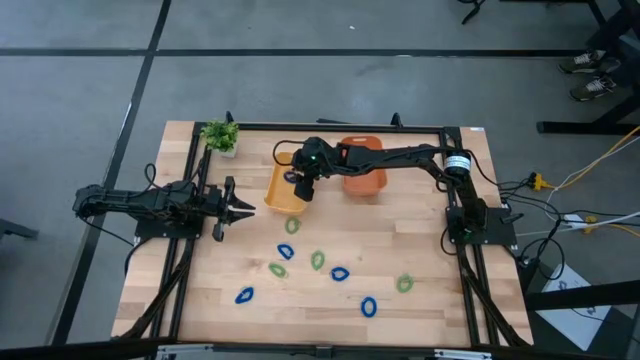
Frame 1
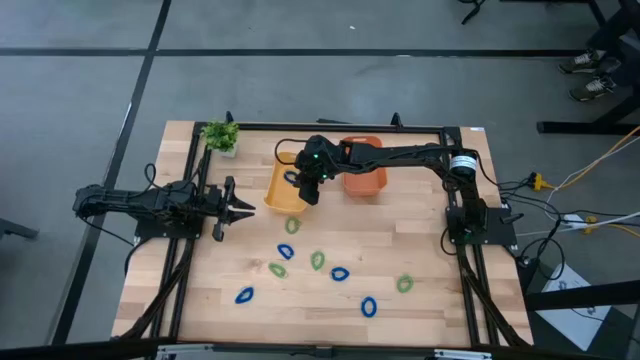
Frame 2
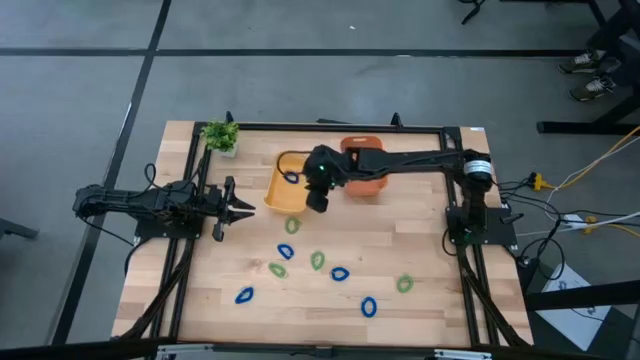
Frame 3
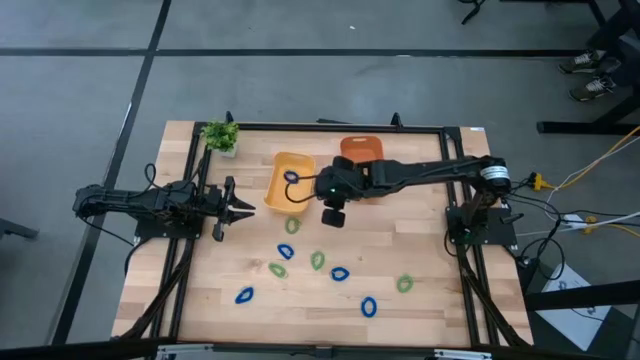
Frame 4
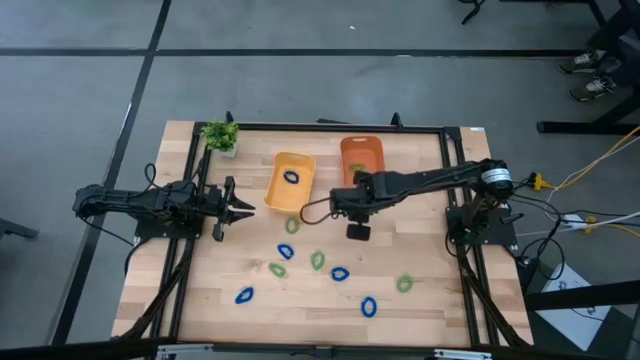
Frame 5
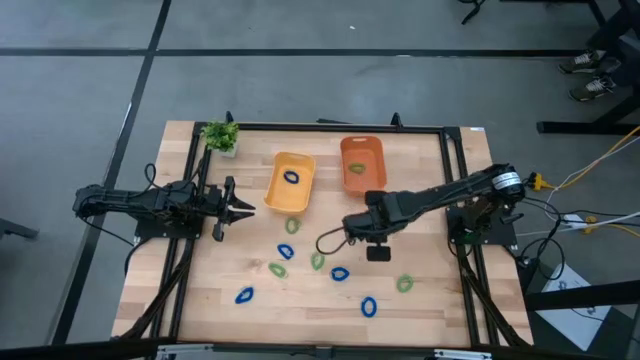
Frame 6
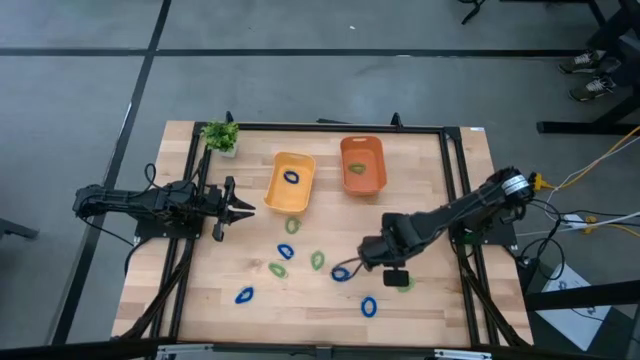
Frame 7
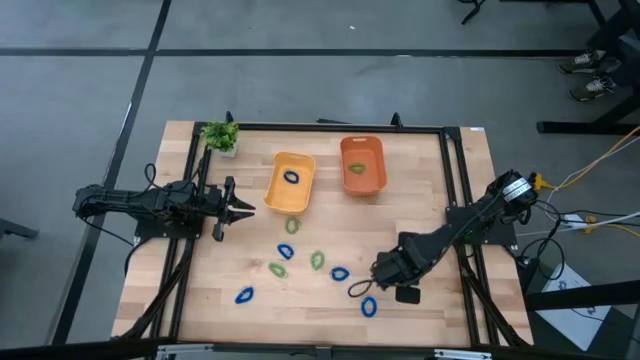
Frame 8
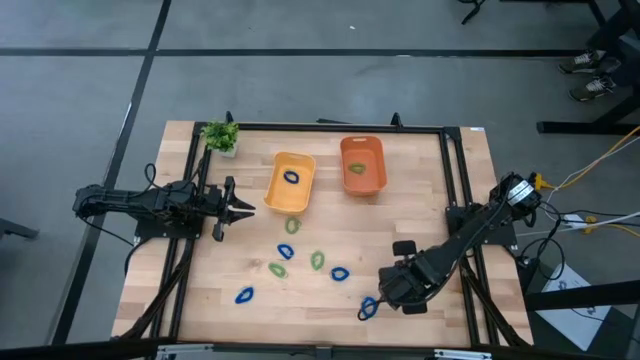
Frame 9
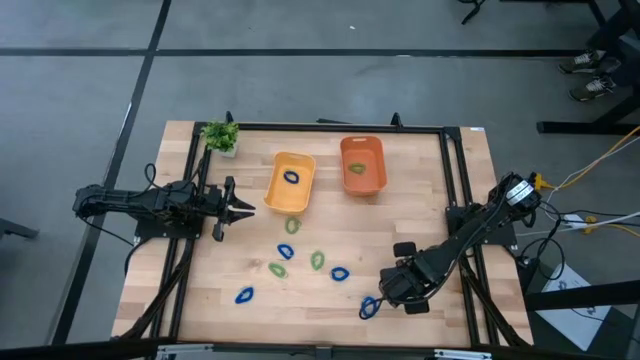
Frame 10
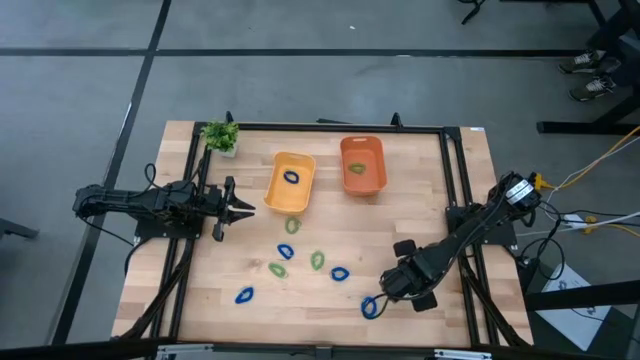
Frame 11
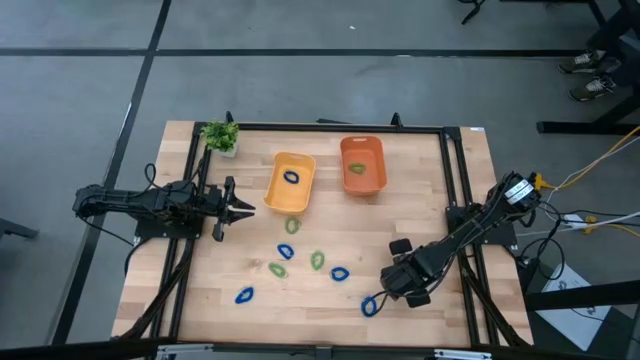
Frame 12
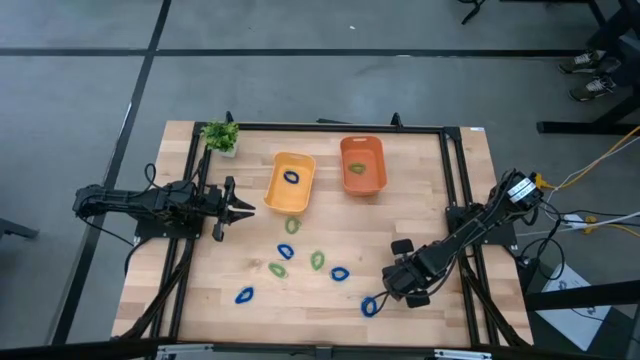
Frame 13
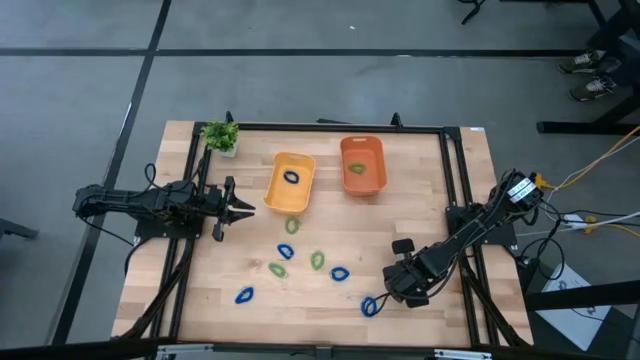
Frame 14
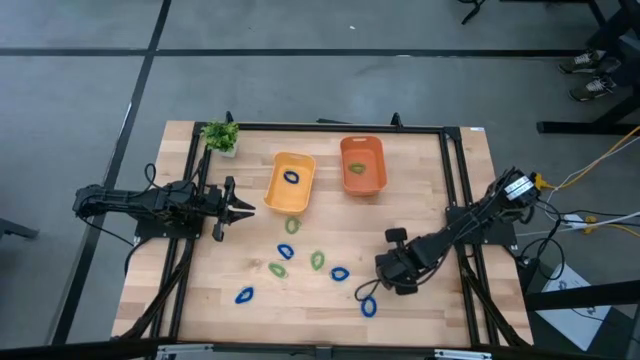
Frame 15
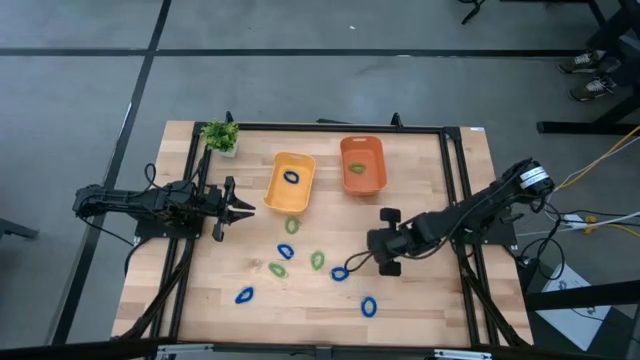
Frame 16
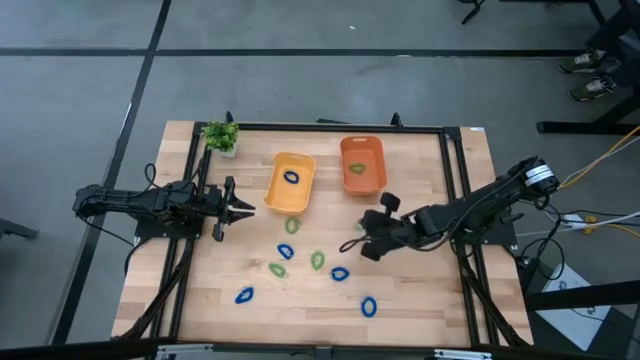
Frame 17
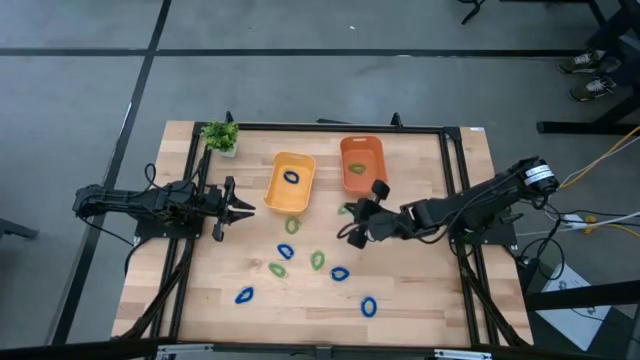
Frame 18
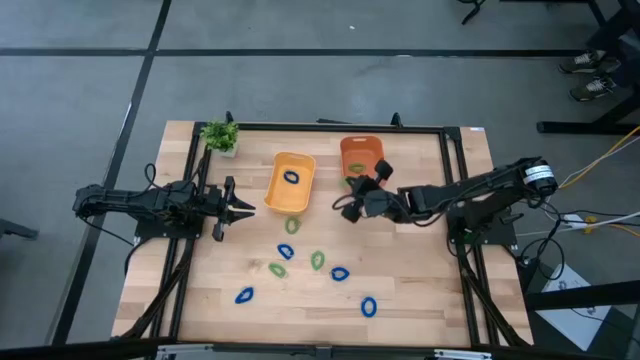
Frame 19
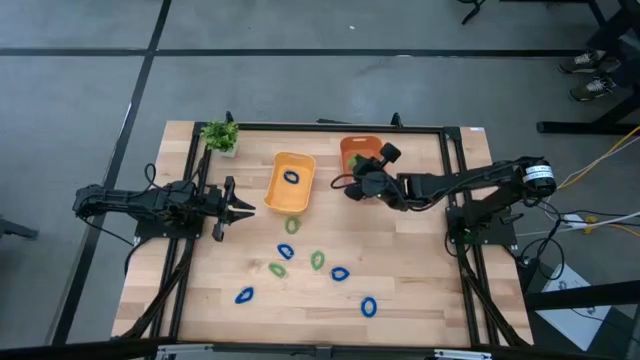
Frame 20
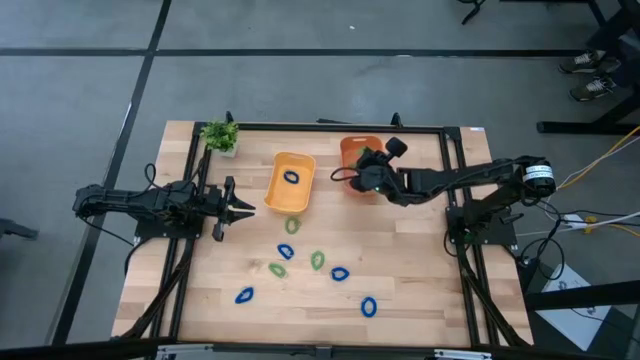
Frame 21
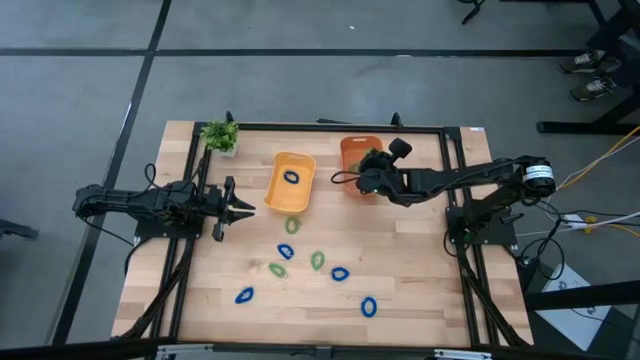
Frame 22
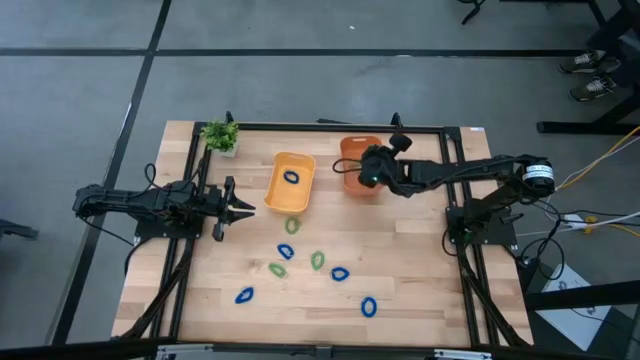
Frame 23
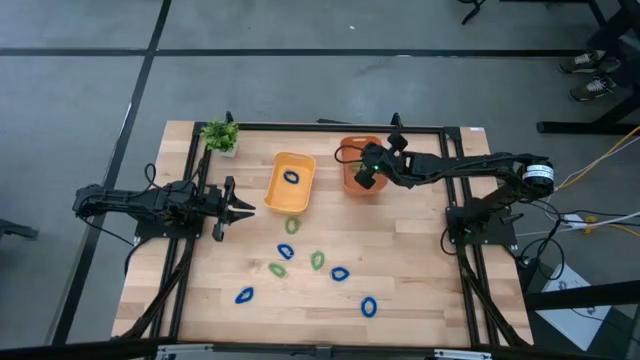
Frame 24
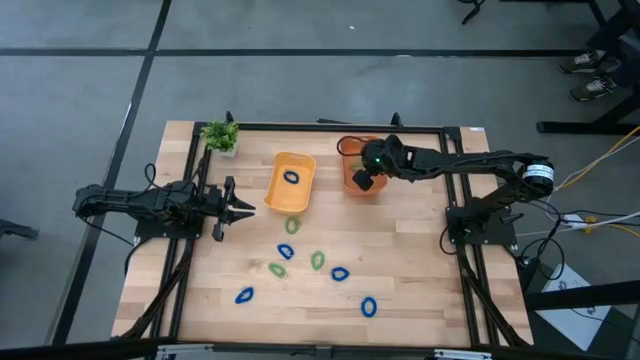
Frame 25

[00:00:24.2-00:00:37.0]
Task: Sort items
Put the green keychain into the orange bin

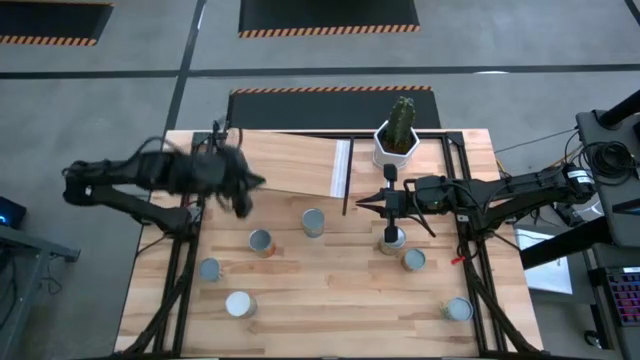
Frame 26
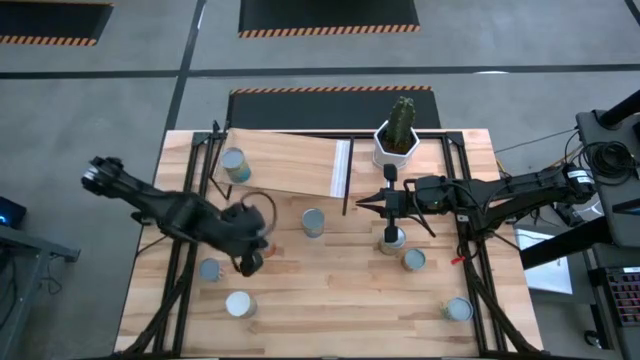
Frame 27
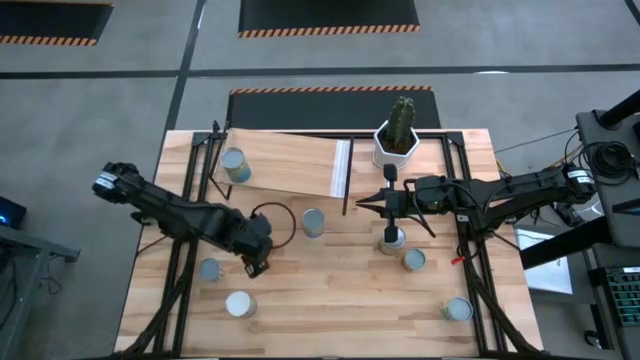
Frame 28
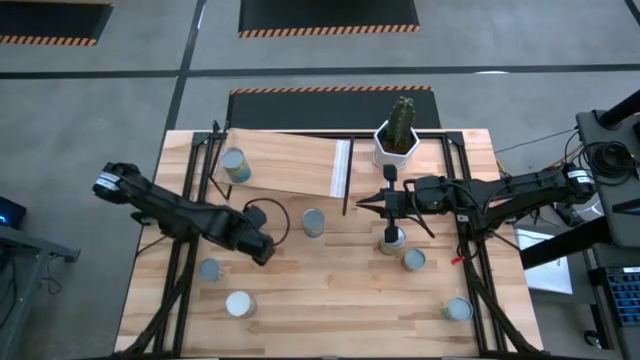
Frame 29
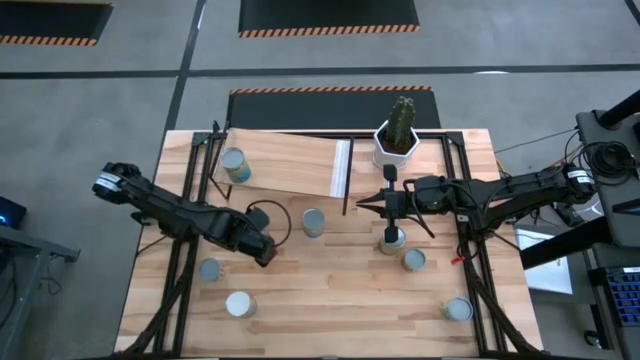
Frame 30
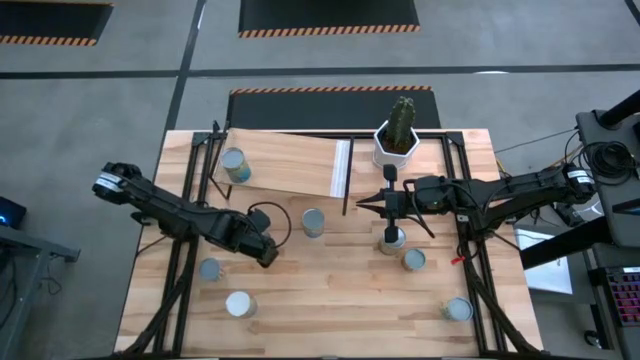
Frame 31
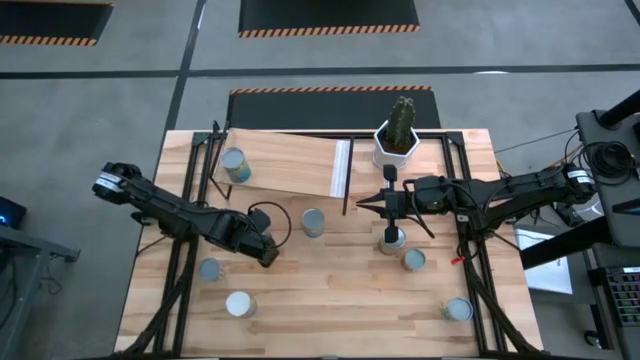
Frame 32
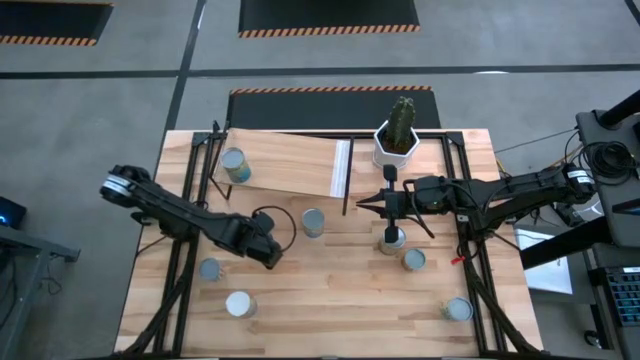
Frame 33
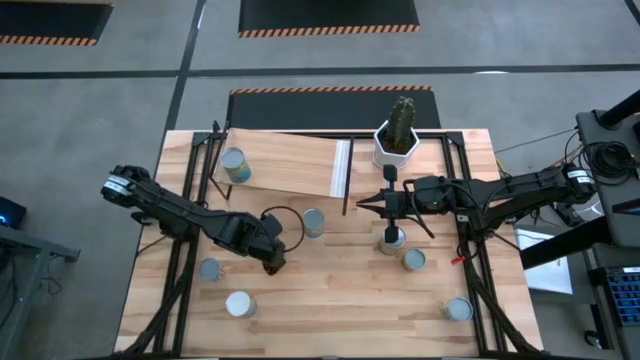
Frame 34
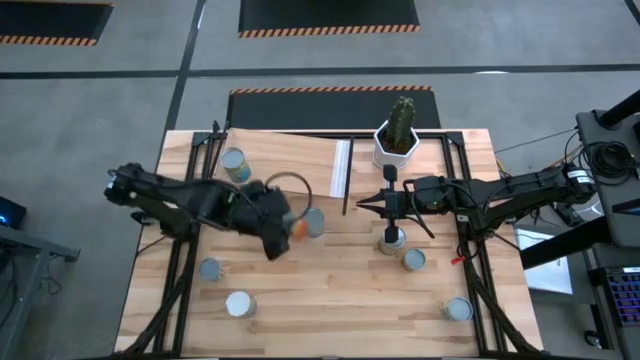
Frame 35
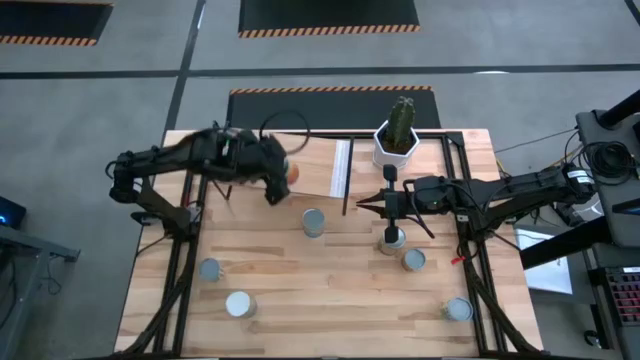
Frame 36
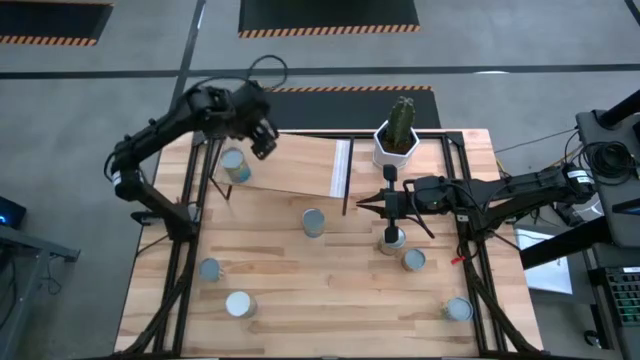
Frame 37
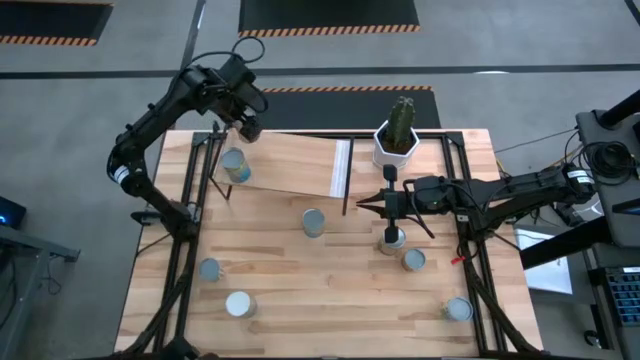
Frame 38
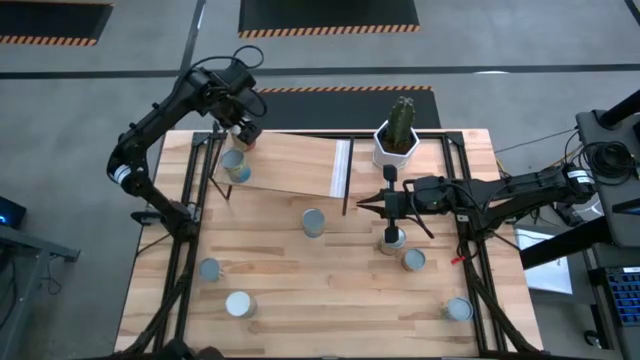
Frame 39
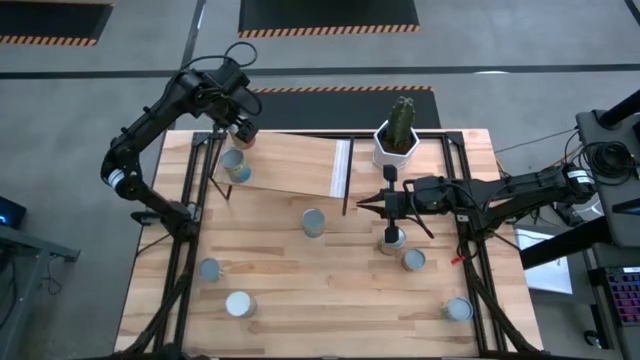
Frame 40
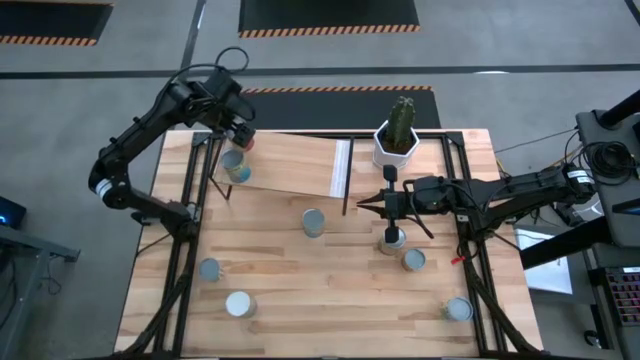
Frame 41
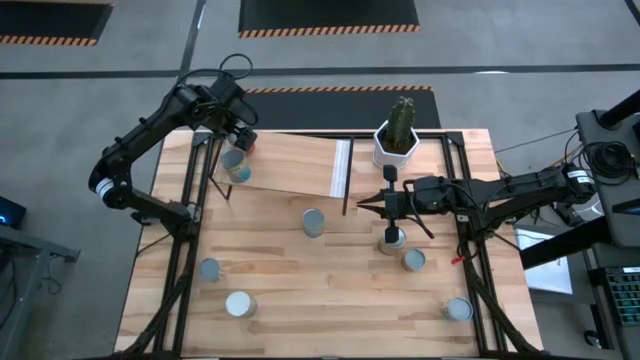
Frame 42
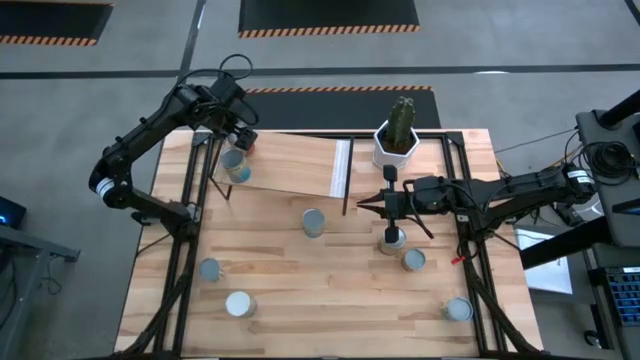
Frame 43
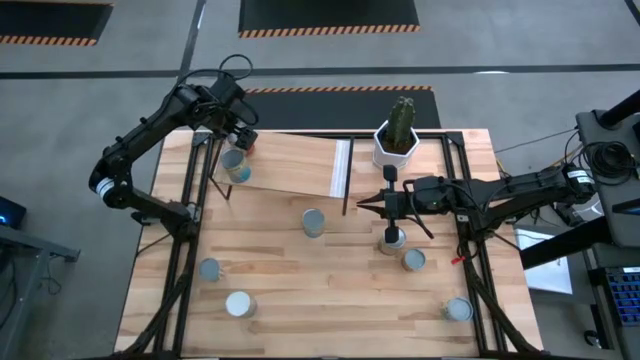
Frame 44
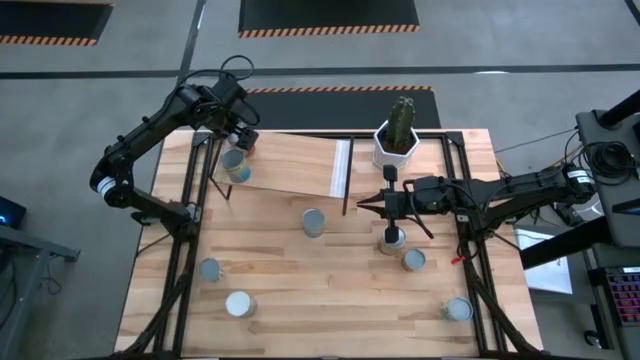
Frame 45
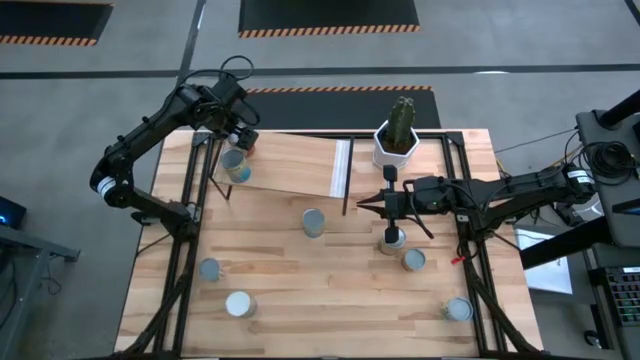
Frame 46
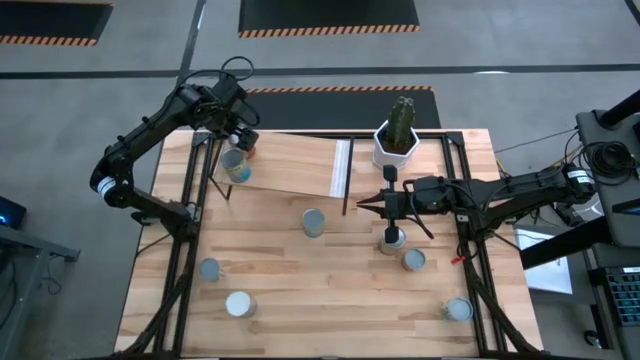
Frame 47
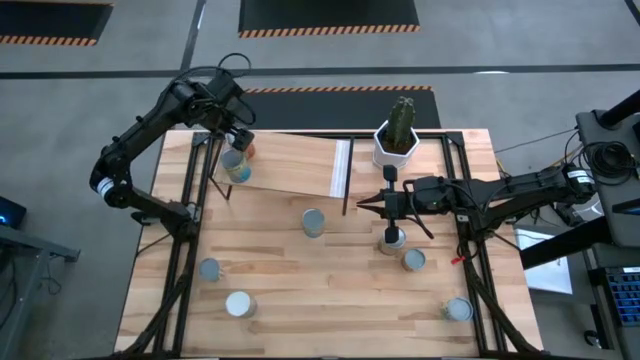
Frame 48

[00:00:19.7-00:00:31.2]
Task: Pick and place cans onto a shelf
Put the canned pineapple on the shelf
